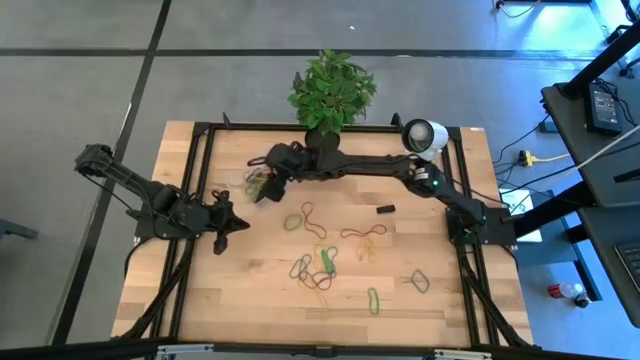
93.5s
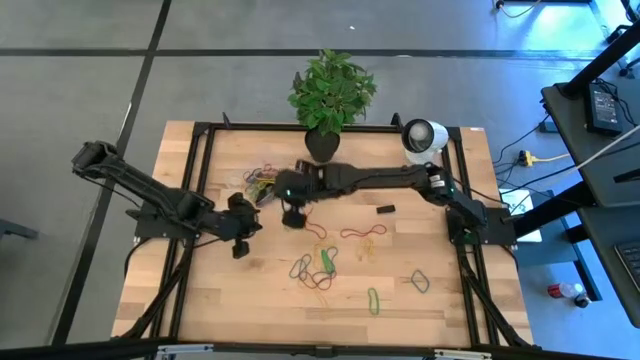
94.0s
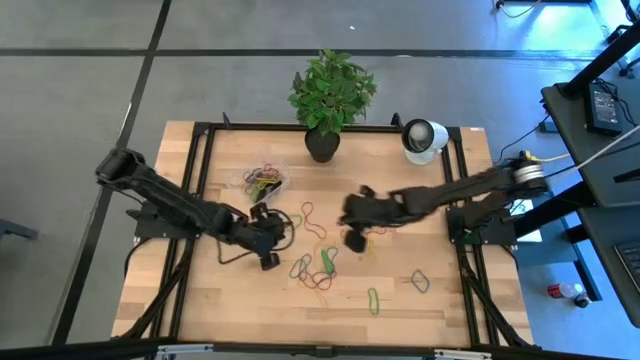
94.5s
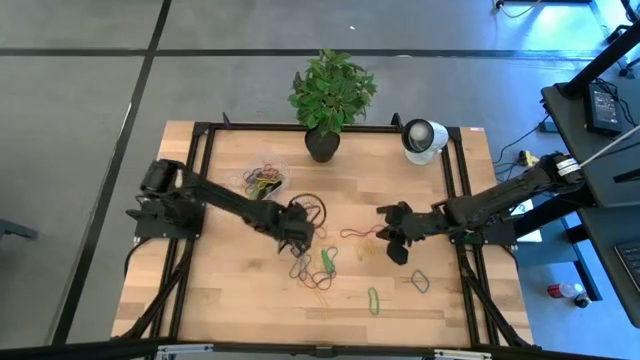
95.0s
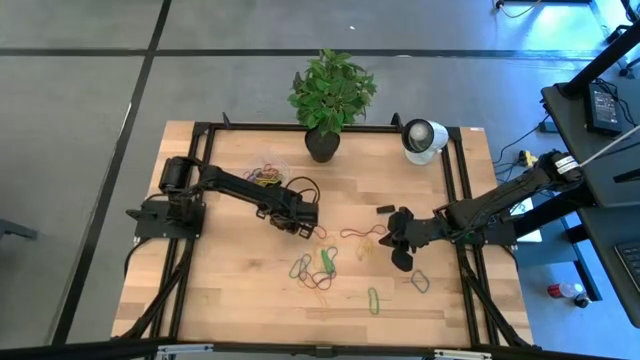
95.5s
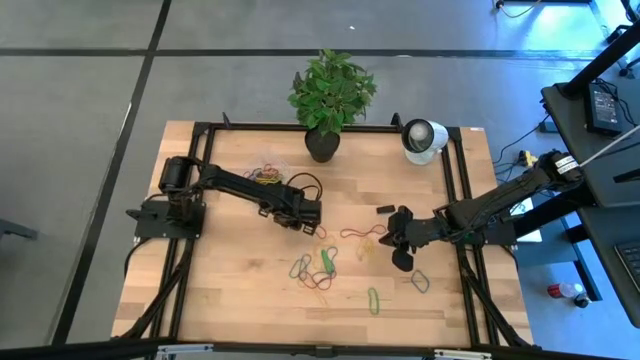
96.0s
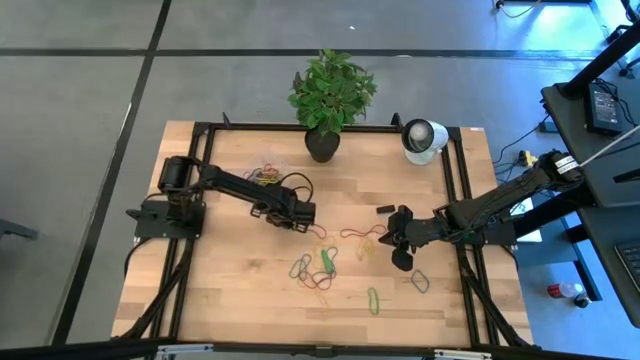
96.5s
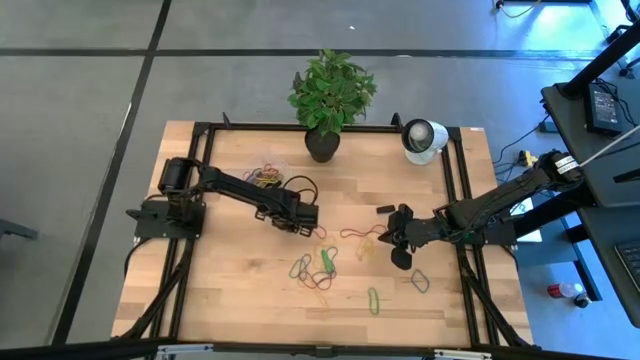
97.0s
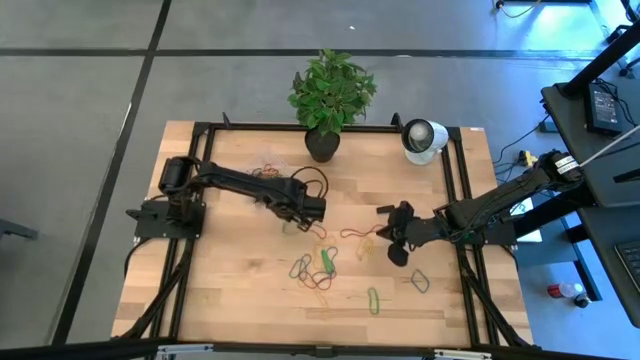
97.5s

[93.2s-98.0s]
Task: Pick and place rubber bands into bin
Put the green rubber band into the transparent bin

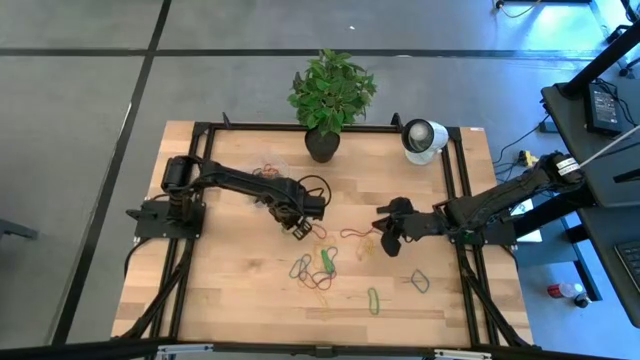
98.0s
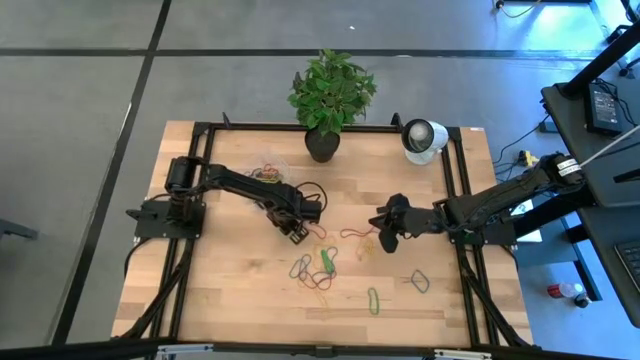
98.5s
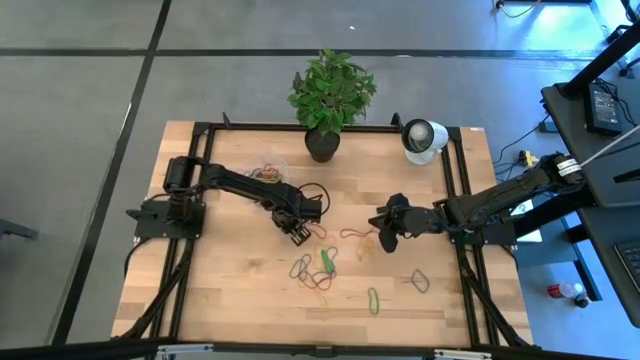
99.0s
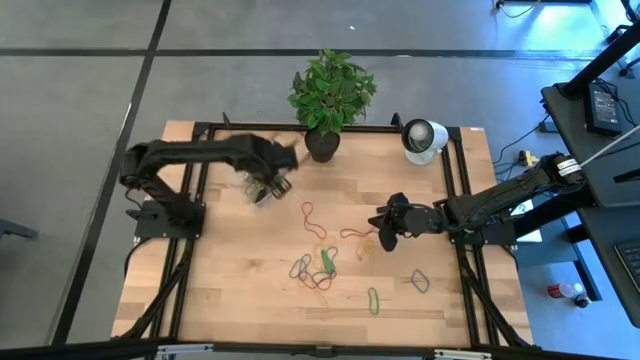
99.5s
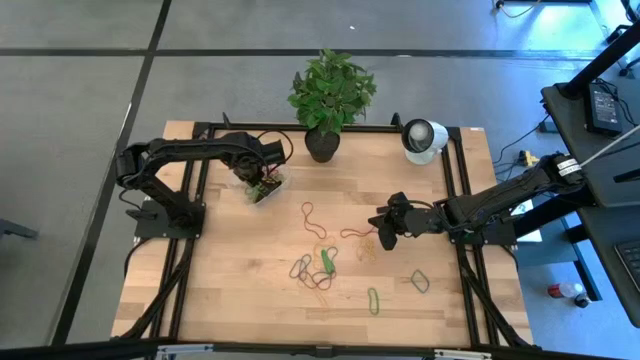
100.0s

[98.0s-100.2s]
Put the green rubber band into the transparent bin

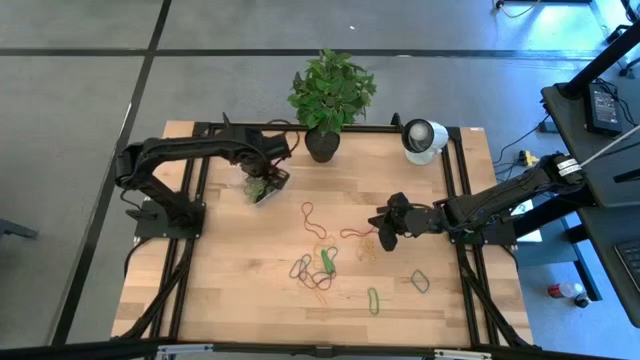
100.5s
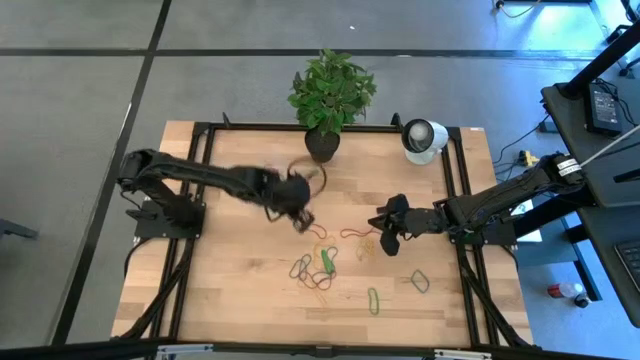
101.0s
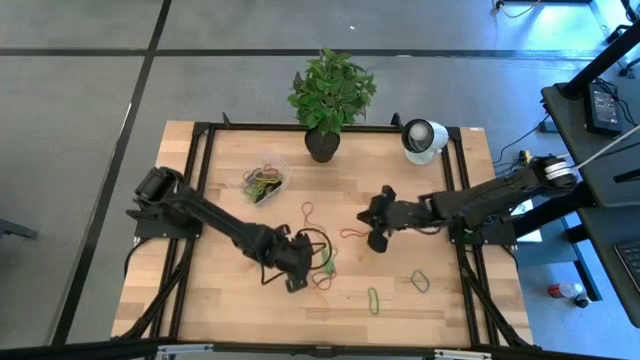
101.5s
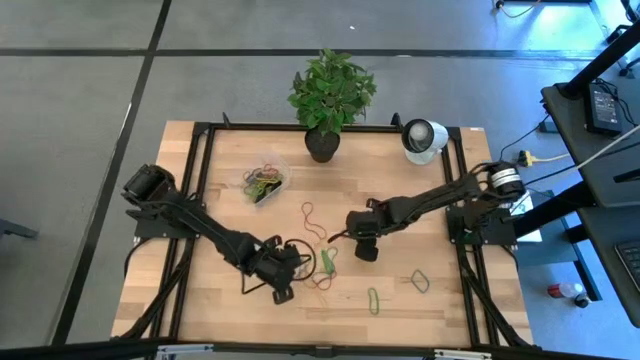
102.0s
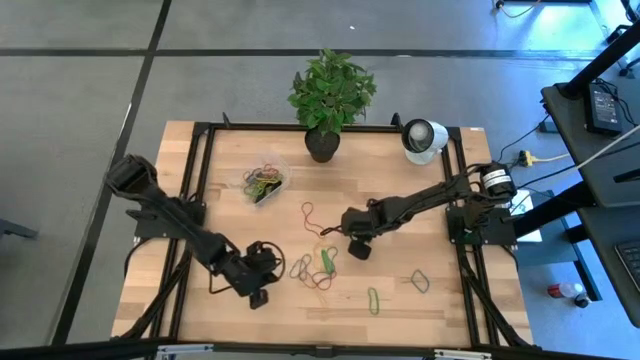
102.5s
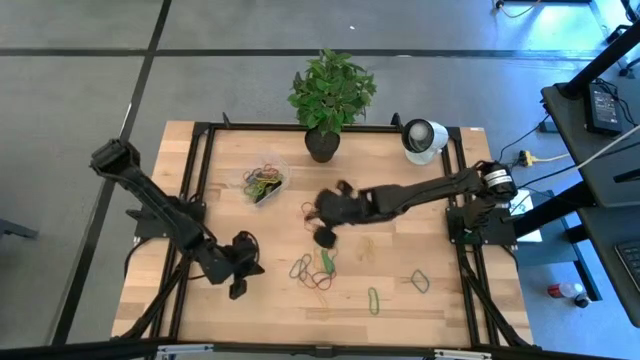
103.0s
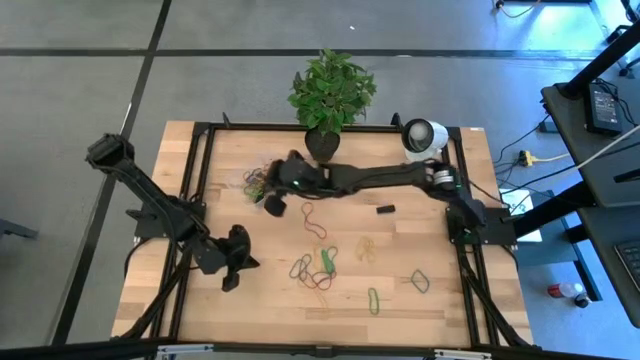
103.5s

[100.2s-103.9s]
Put the red rubber band into the transparent bin

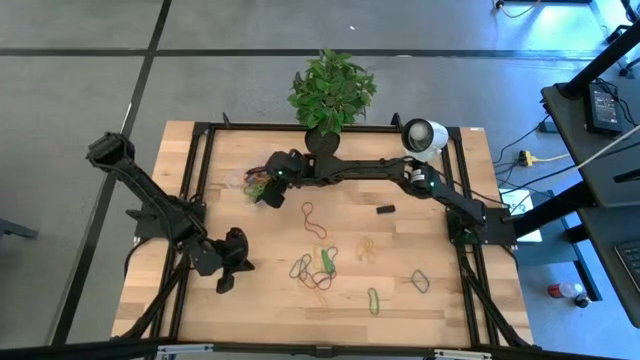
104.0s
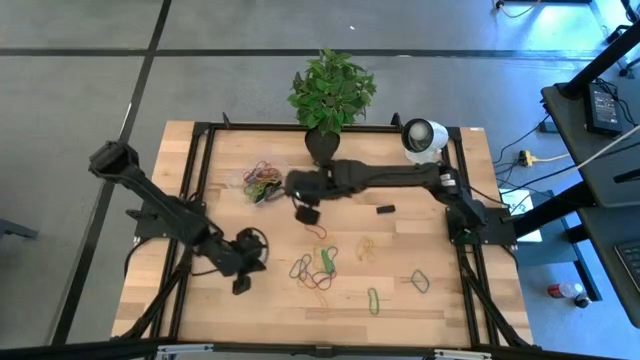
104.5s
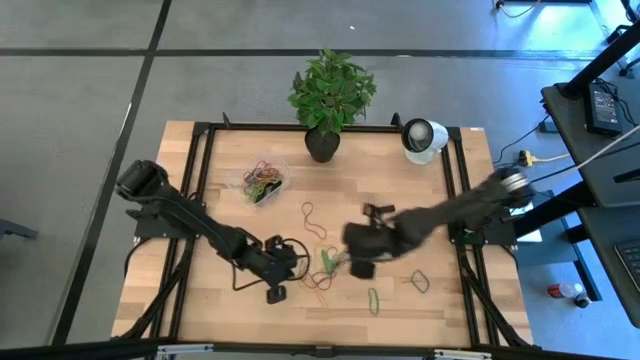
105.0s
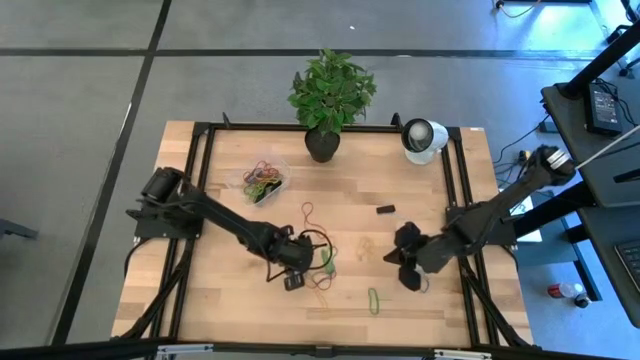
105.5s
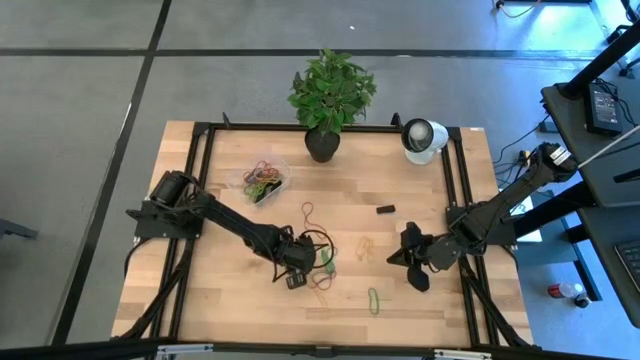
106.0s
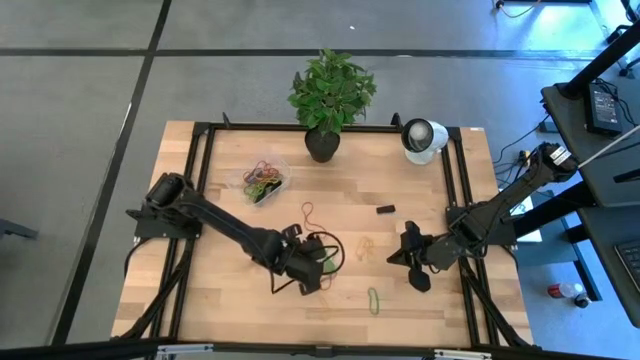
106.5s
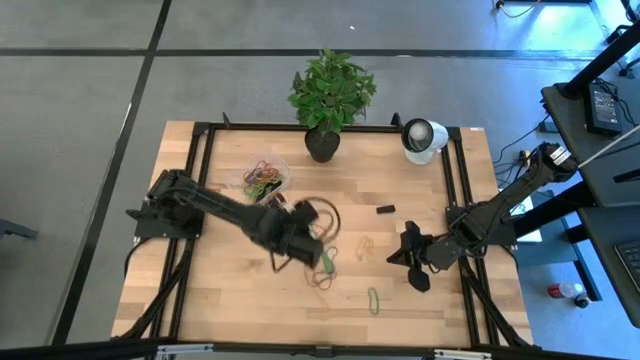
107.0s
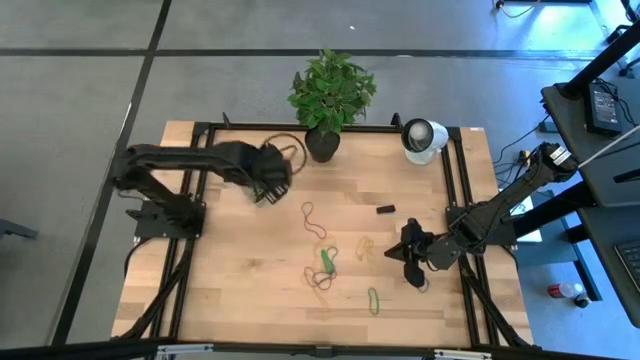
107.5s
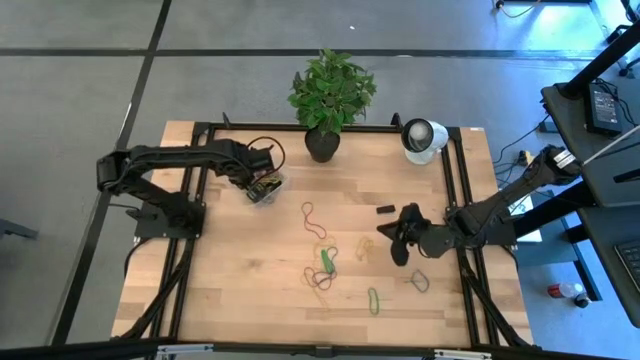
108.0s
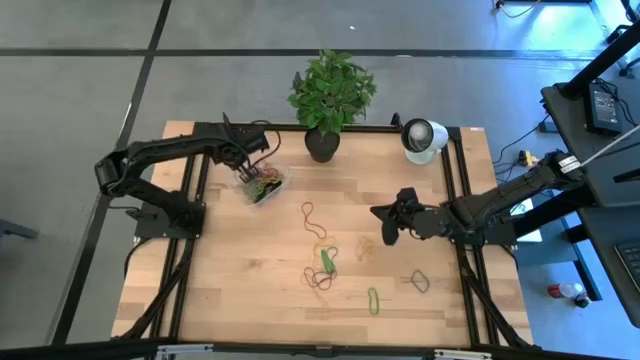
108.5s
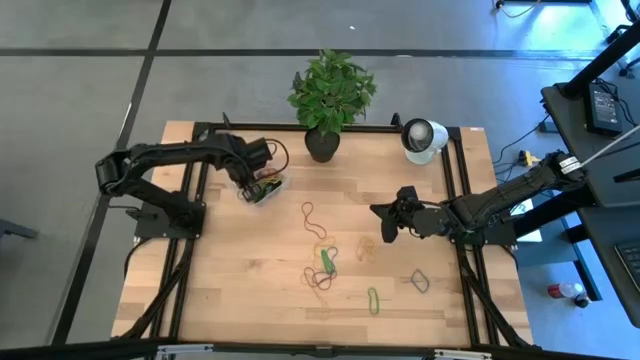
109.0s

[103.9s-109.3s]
Put the blue rubber band into the transparent bin

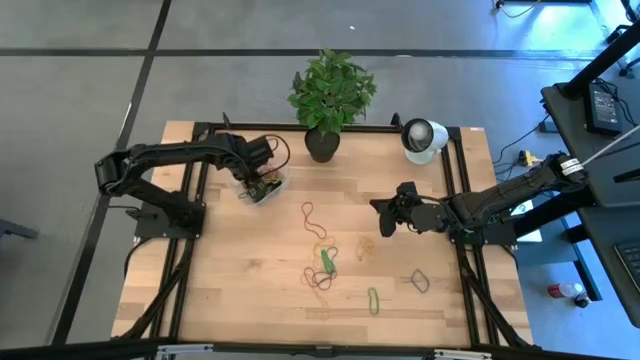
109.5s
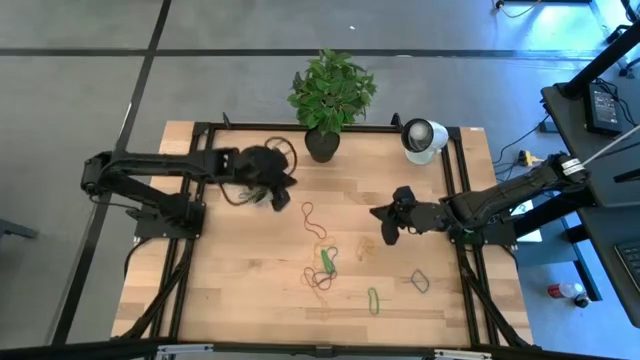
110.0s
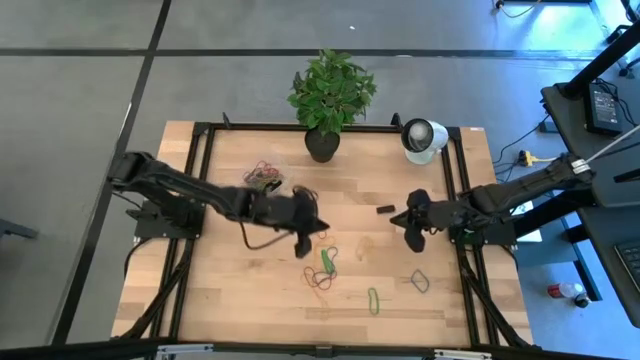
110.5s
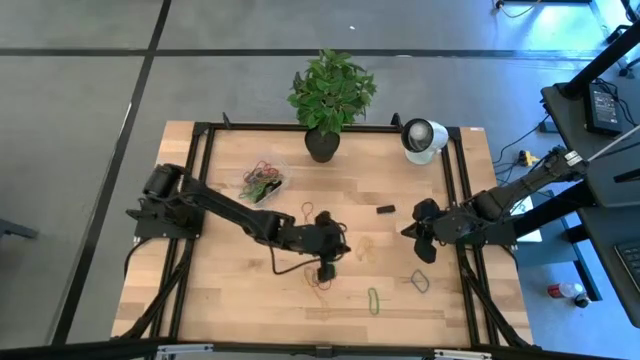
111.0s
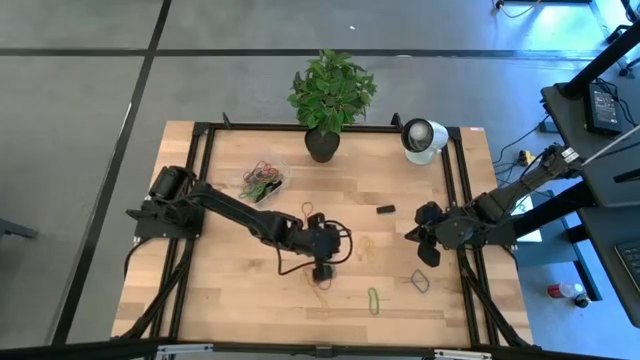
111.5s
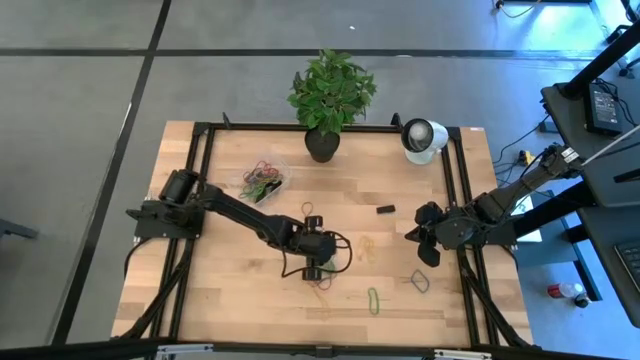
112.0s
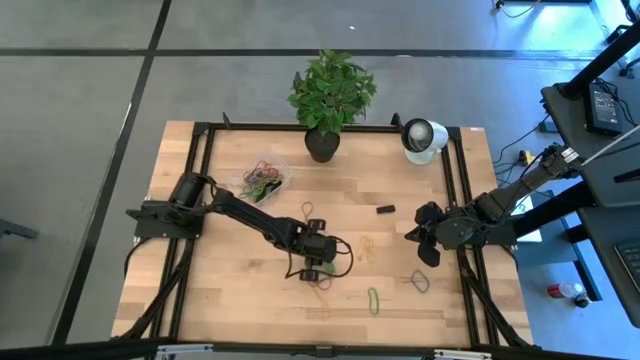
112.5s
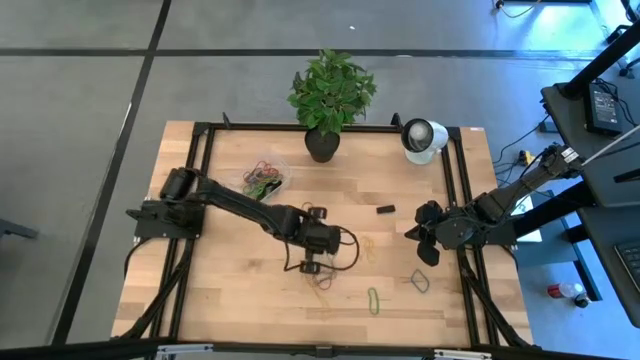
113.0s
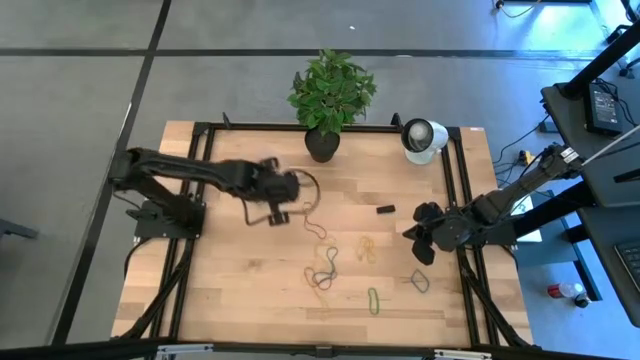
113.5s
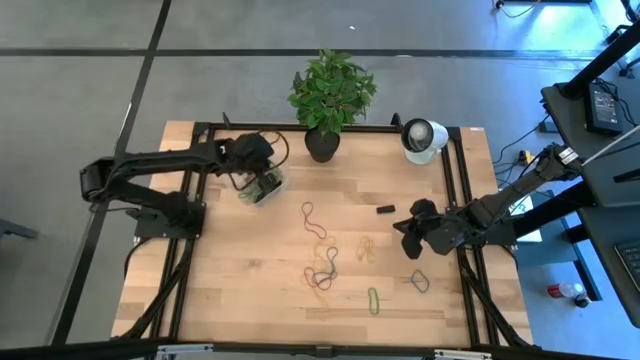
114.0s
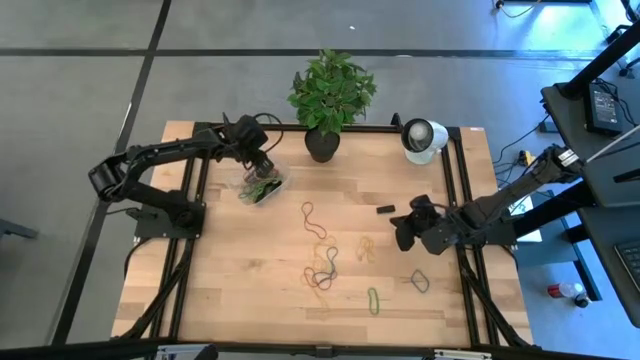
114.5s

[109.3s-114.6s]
Put the green rubber band into the transparent bin
